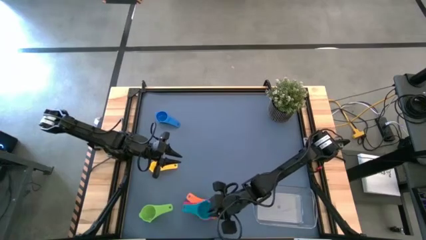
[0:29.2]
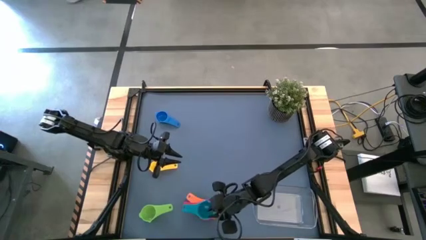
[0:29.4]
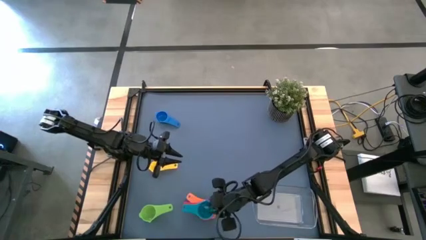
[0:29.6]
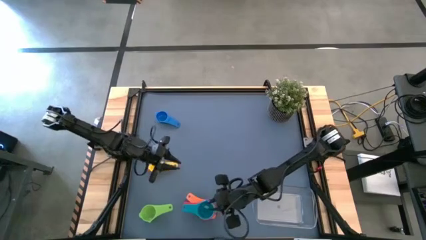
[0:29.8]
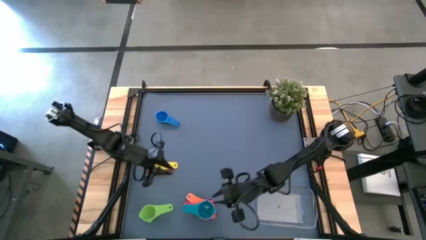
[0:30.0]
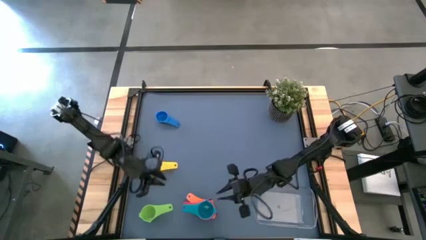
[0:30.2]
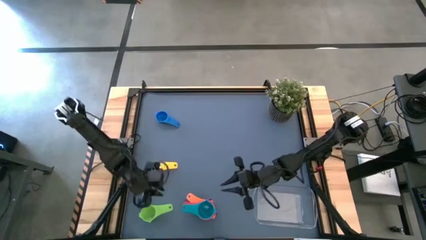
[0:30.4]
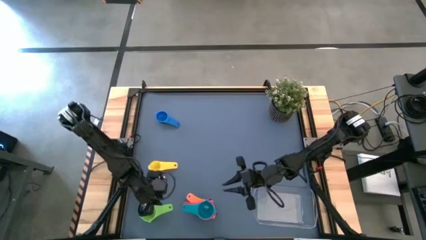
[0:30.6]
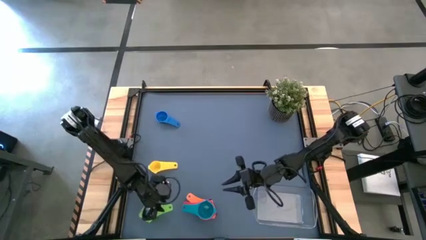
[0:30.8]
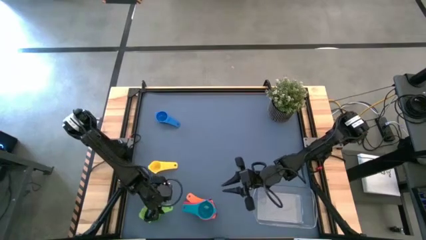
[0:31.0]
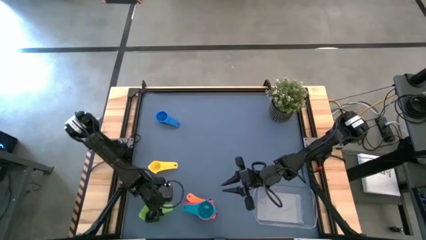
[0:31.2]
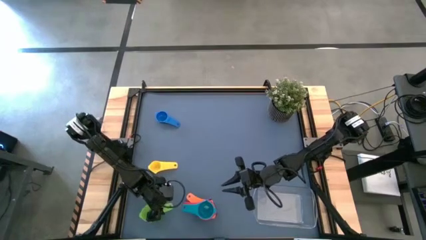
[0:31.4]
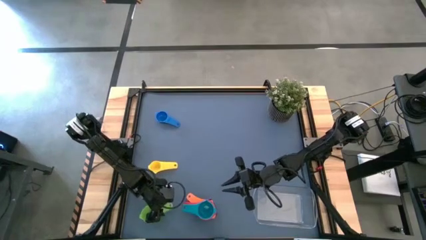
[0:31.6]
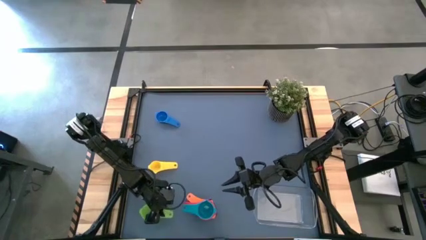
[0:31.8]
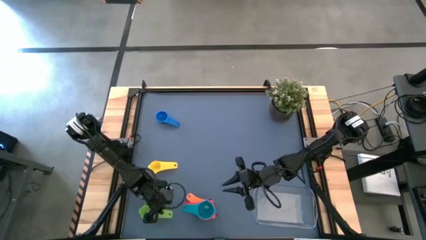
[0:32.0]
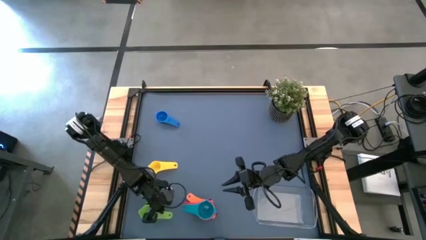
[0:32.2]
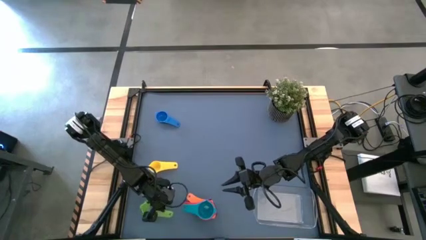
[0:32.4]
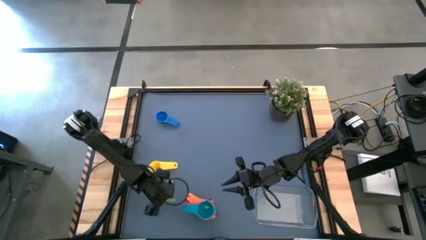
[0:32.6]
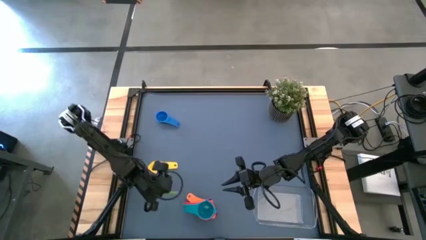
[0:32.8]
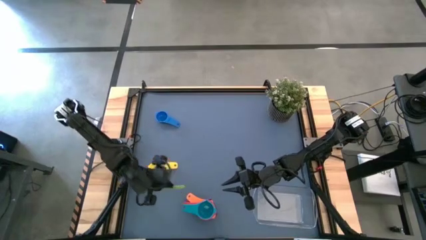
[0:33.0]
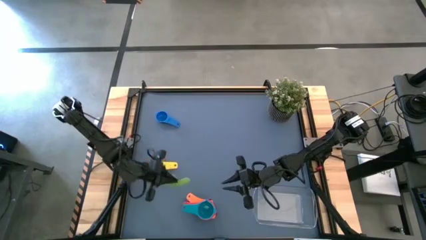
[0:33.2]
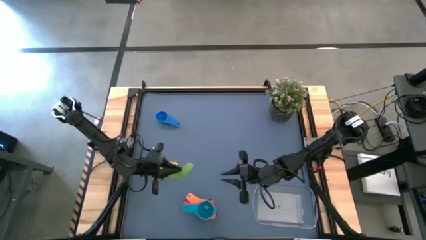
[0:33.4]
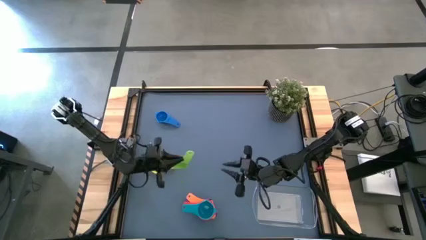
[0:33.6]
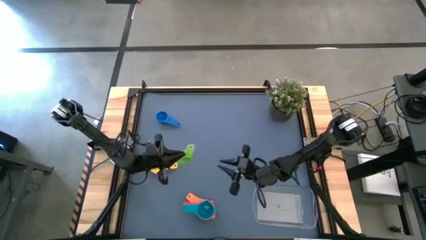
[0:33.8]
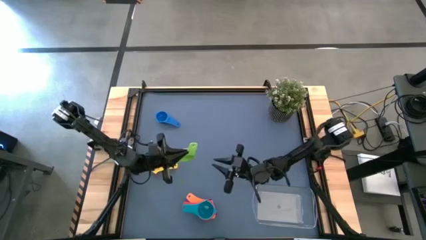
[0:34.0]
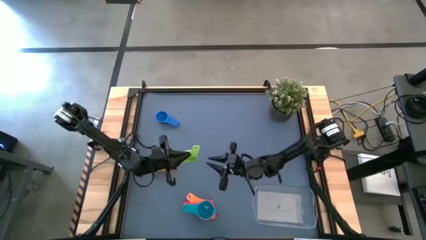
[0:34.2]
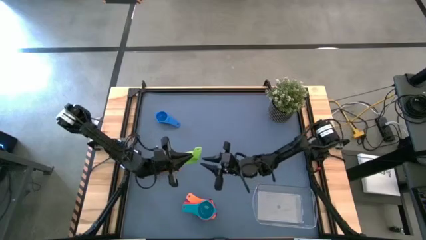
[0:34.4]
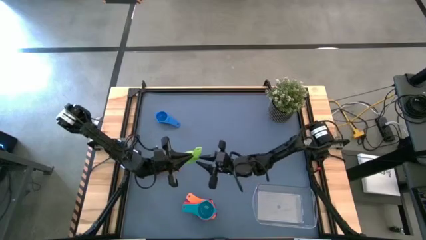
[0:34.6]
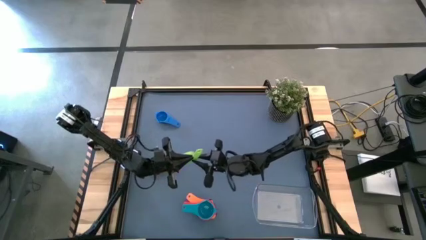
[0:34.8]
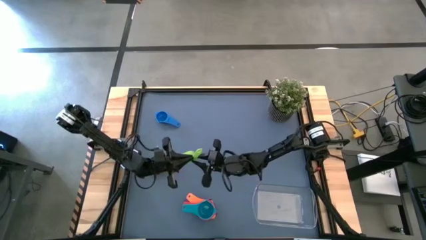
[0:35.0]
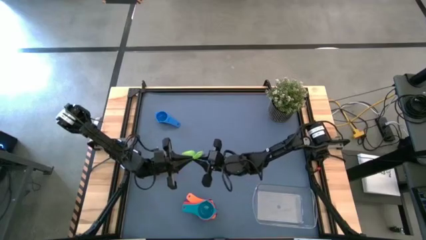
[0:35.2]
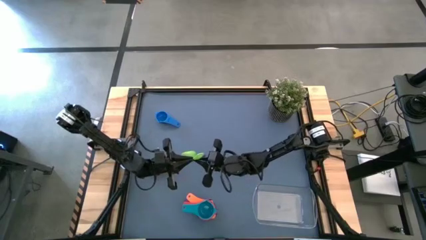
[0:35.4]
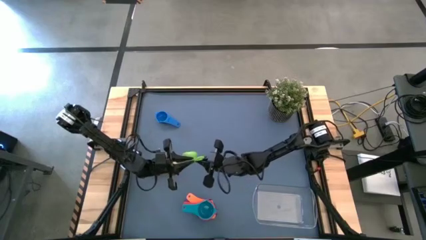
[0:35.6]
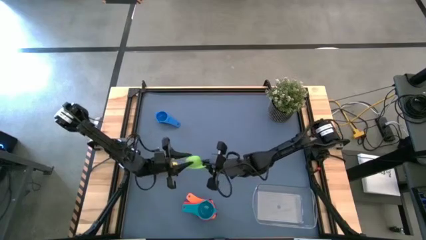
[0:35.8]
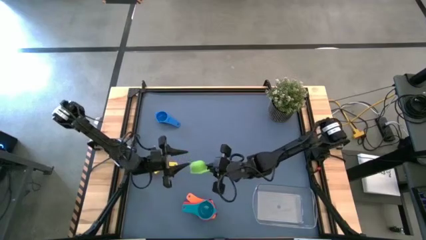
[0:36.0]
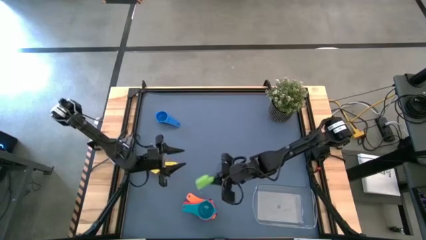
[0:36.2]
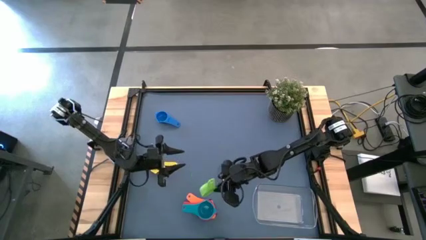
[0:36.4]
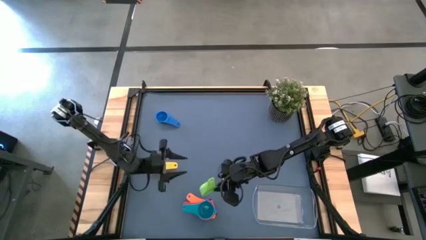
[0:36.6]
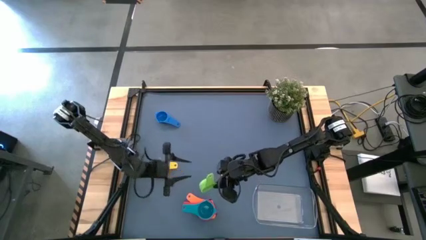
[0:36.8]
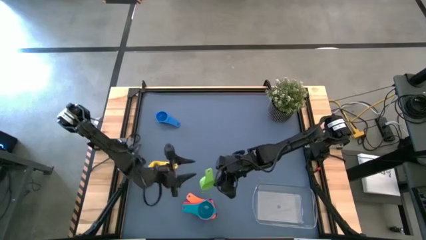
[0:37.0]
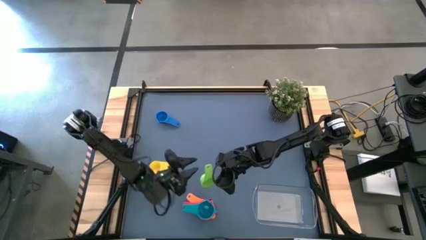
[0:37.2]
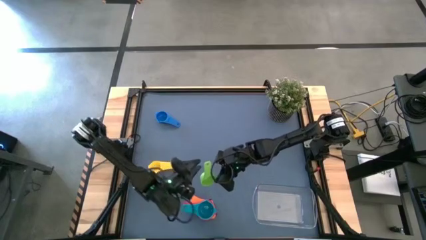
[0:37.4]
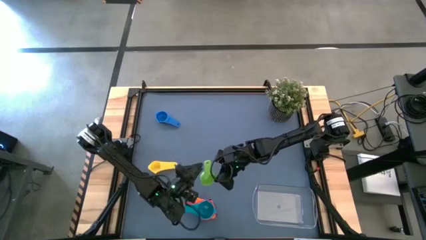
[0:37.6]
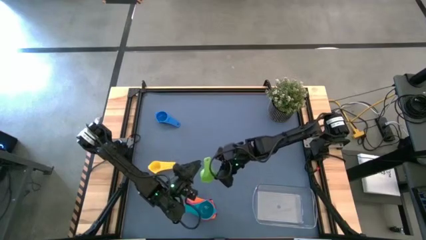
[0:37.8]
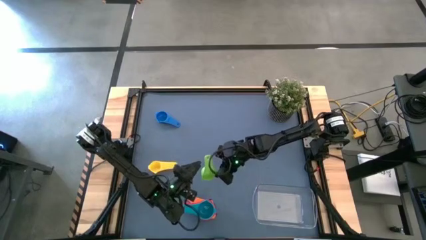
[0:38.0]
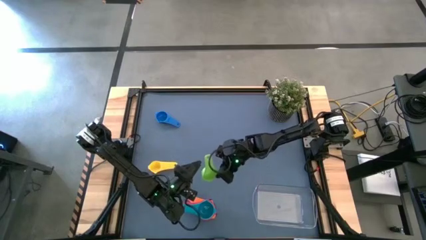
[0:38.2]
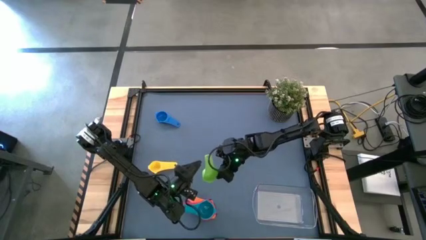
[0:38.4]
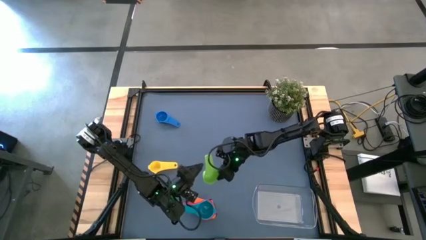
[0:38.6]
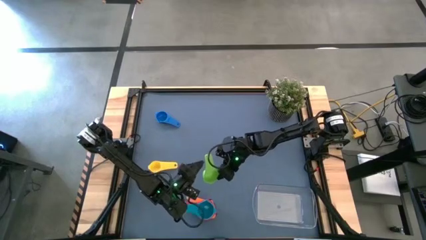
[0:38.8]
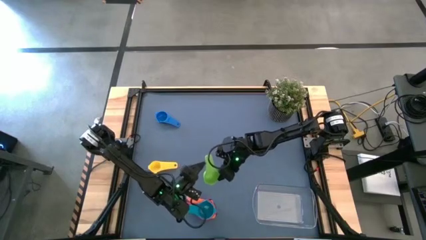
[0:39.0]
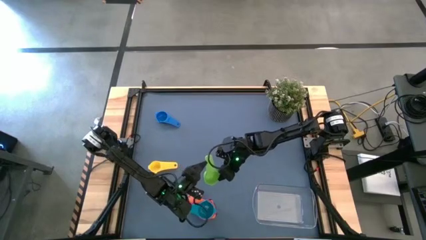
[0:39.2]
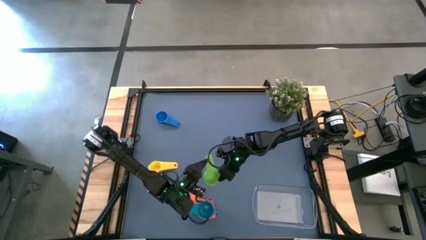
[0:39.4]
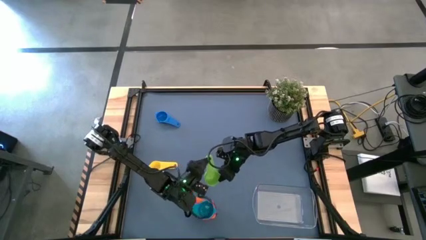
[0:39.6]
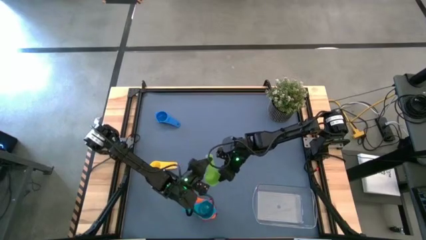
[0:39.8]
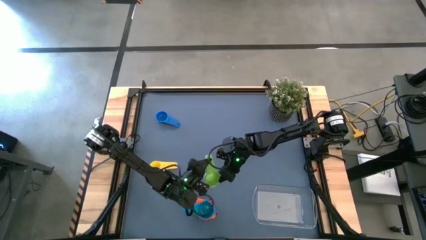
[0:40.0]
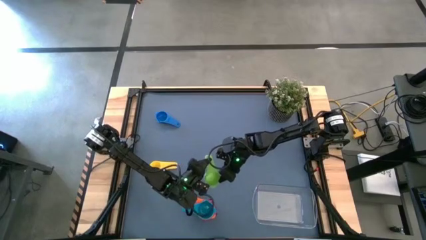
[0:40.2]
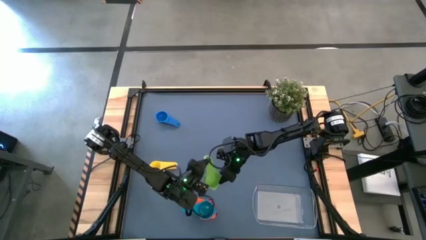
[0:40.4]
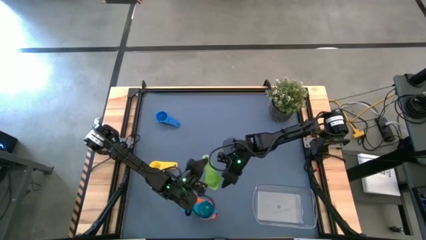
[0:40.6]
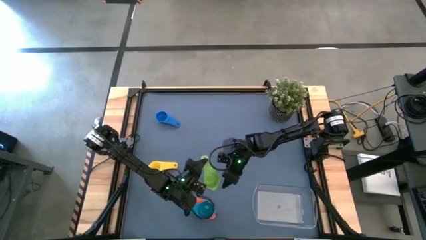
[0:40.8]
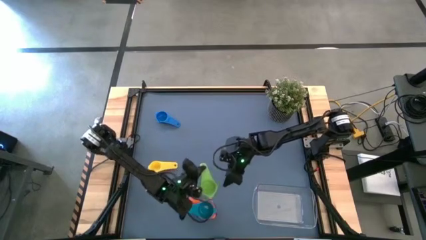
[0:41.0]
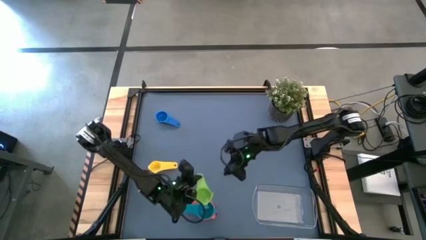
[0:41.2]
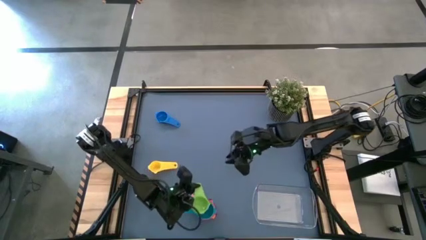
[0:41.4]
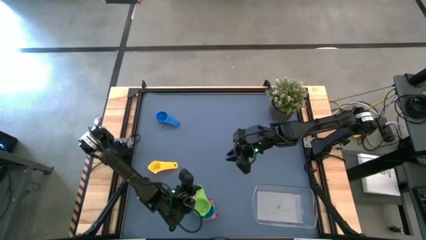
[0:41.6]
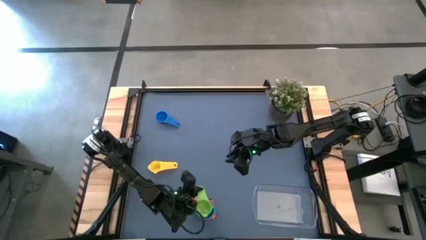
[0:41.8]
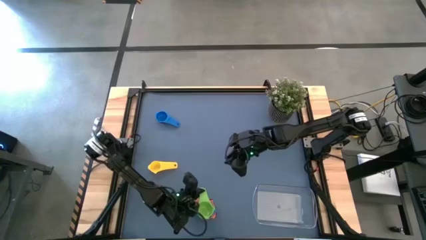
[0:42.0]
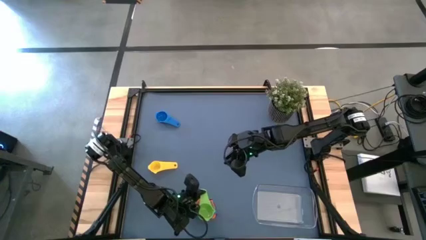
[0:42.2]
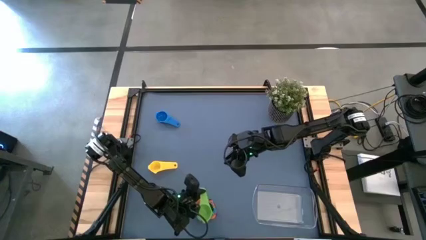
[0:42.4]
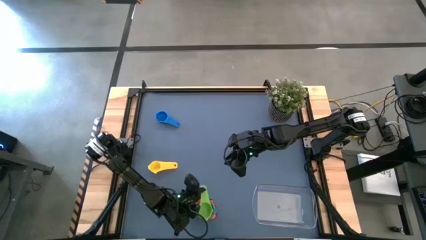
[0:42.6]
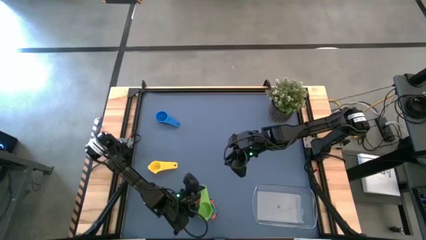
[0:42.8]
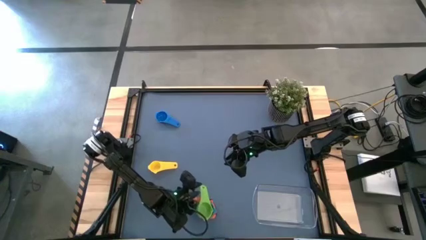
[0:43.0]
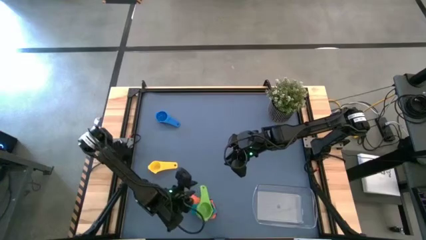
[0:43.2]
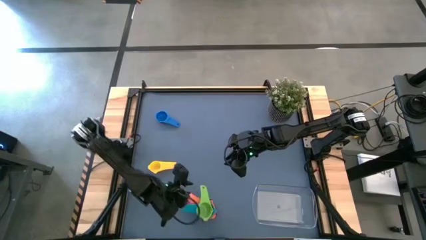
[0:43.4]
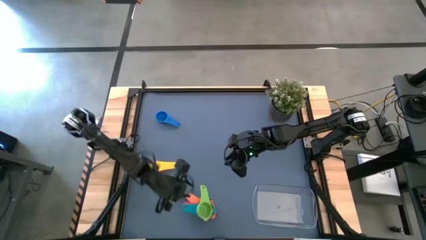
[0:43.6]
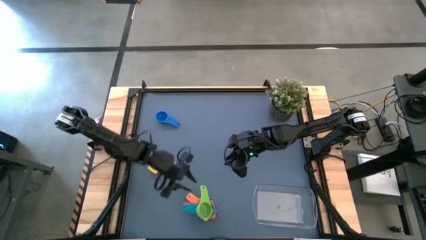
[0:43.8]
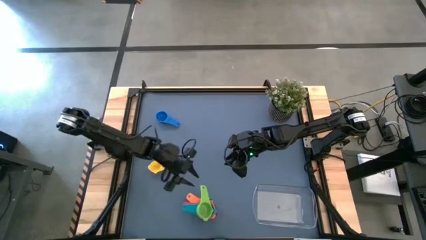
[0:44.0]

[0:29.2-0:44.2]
Task: Nest measuring cups in basket
Stack the light green measuring cup on top of the light blue measuring cup

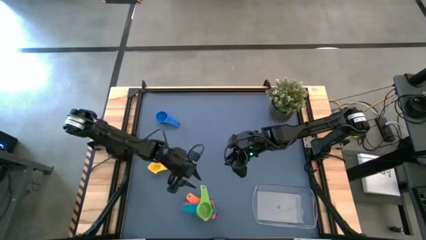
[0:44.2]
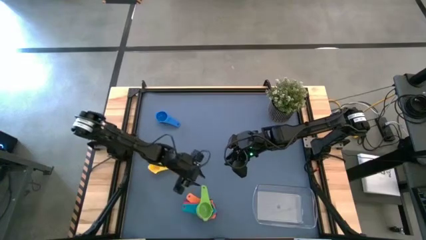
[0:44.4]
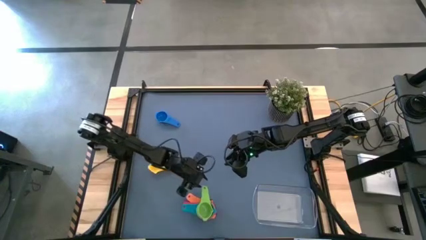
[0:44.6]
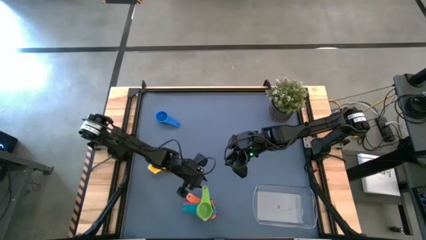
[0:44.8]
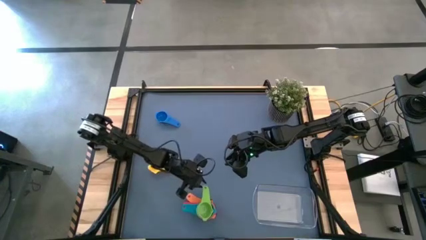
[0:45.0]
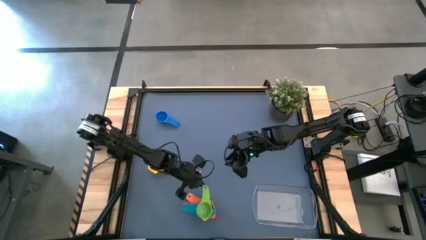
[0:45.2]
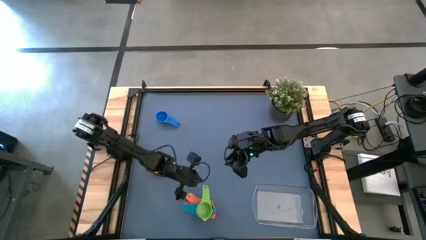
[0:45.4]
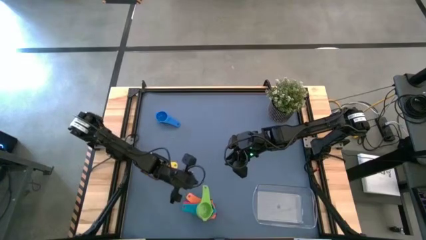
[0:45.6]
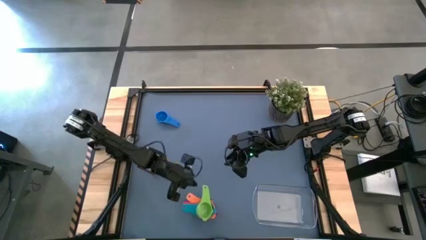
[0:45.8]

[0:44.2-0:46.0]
Stack the light green measuring cup on top of the light blue measuring cup
